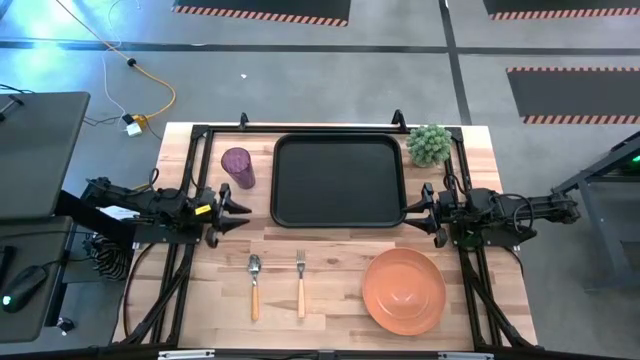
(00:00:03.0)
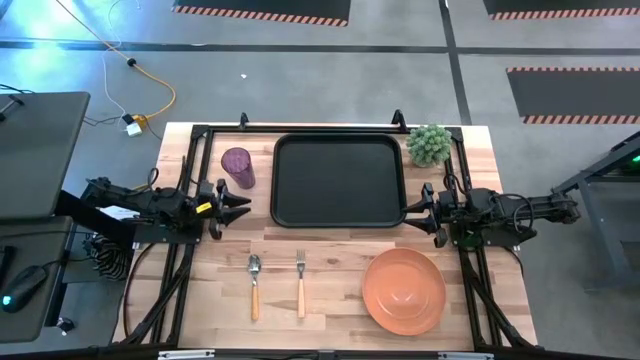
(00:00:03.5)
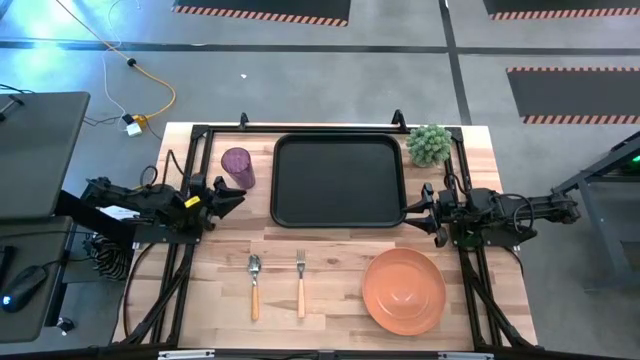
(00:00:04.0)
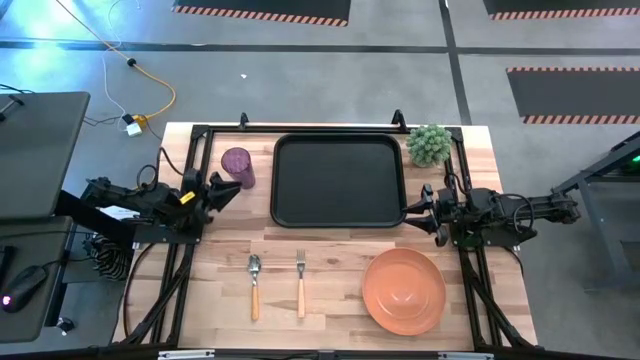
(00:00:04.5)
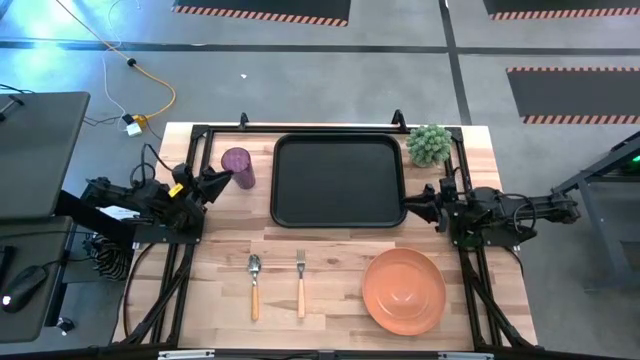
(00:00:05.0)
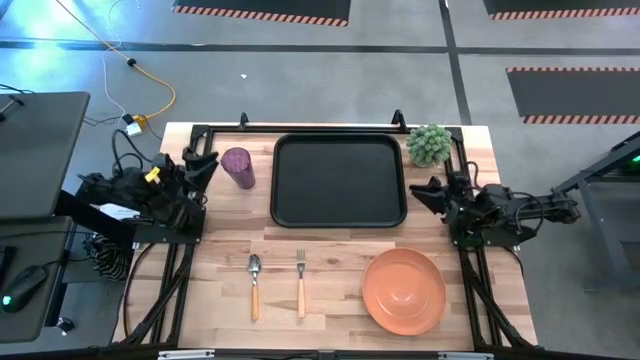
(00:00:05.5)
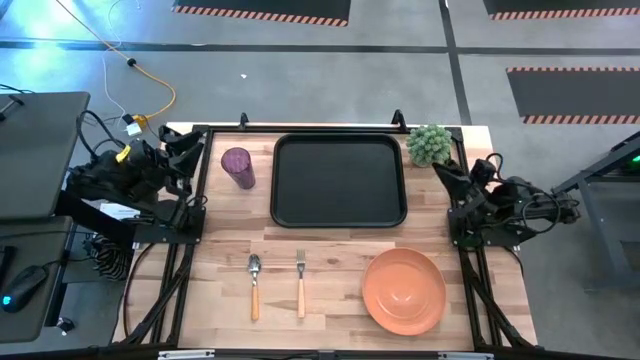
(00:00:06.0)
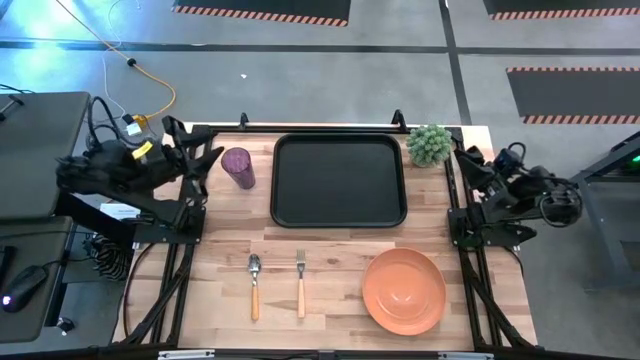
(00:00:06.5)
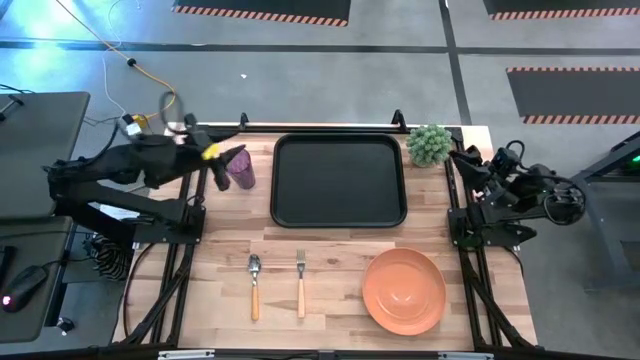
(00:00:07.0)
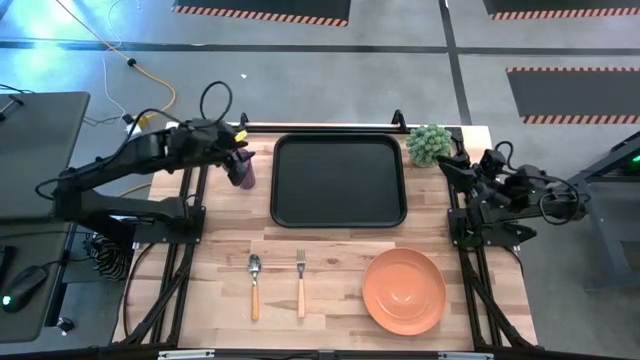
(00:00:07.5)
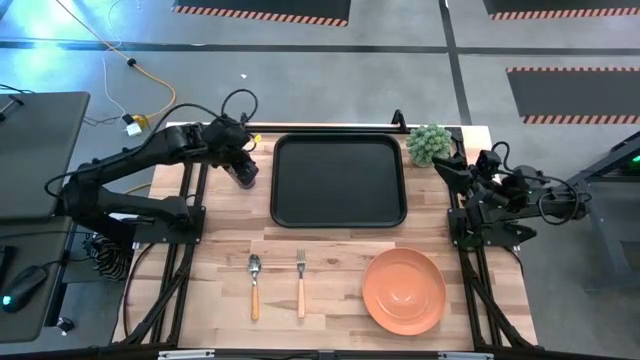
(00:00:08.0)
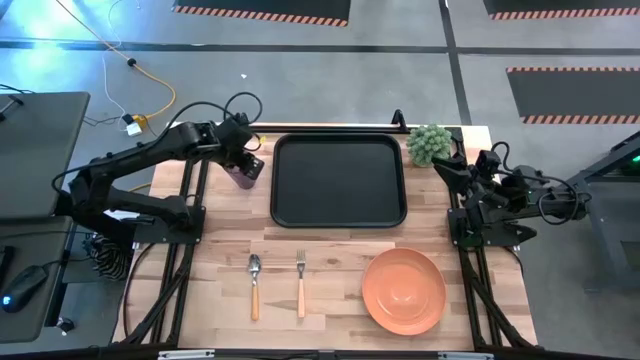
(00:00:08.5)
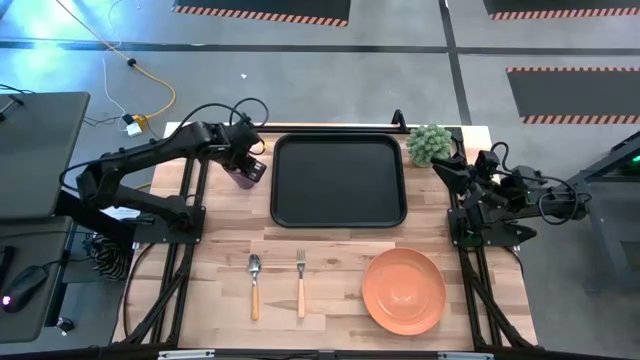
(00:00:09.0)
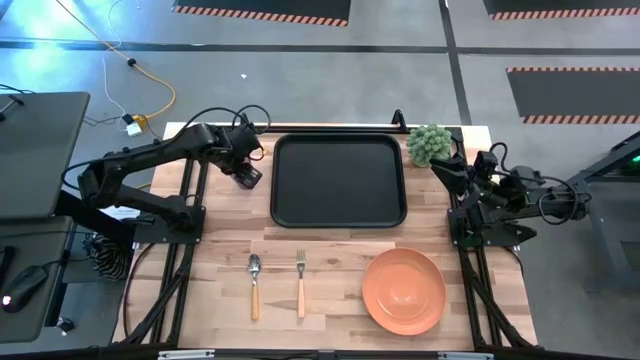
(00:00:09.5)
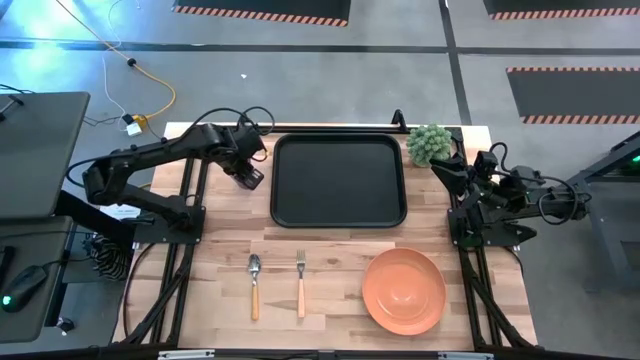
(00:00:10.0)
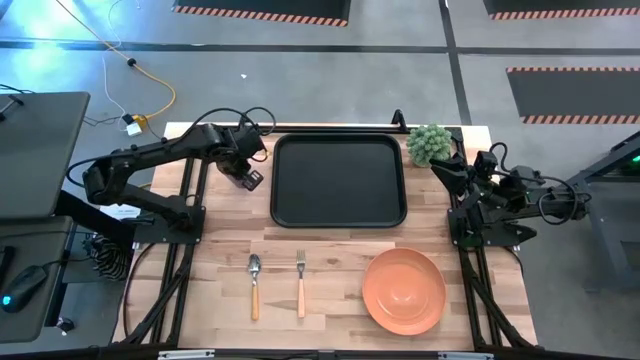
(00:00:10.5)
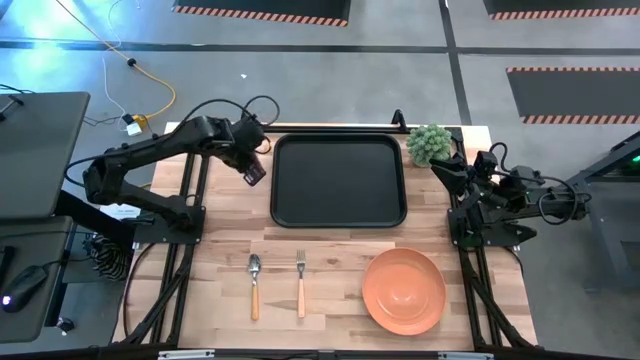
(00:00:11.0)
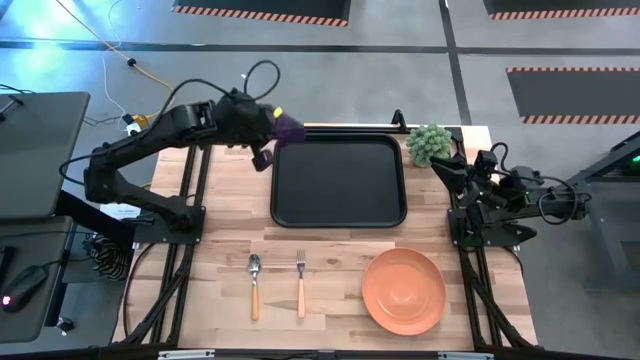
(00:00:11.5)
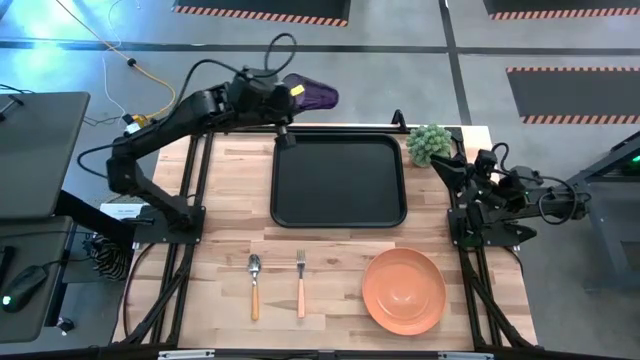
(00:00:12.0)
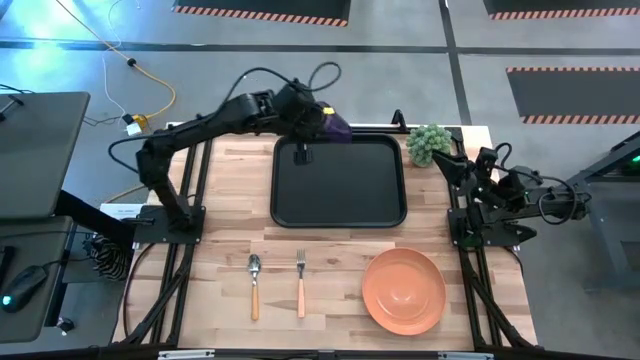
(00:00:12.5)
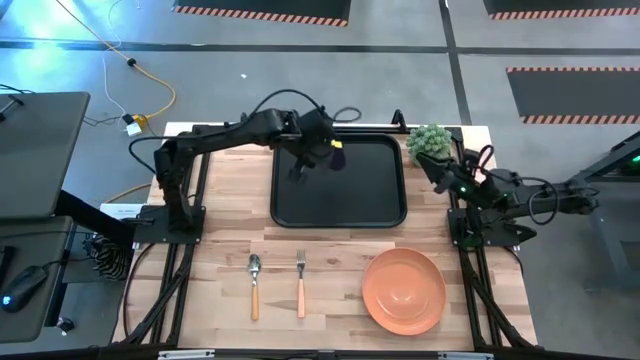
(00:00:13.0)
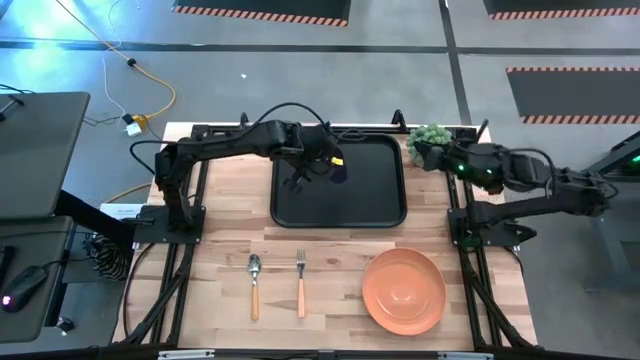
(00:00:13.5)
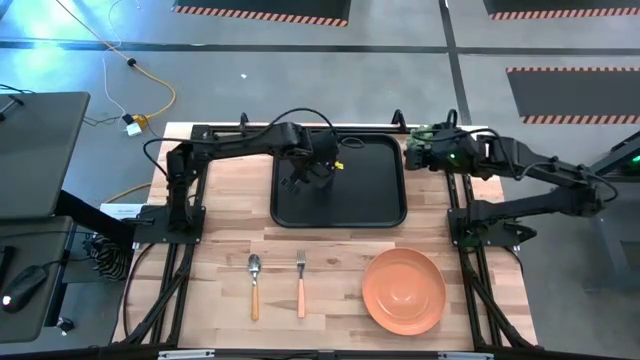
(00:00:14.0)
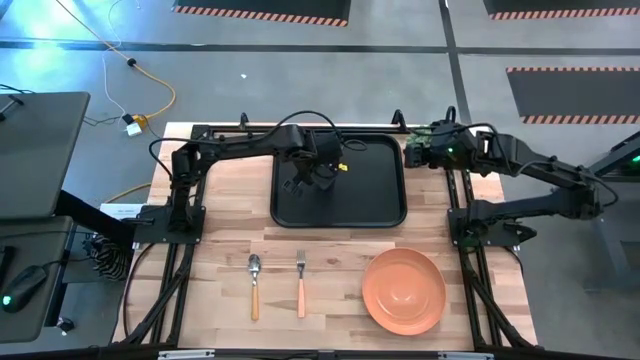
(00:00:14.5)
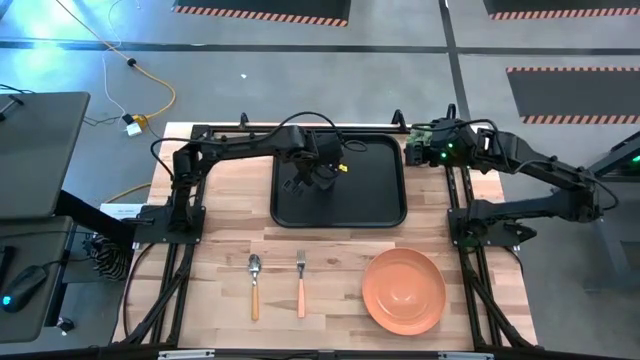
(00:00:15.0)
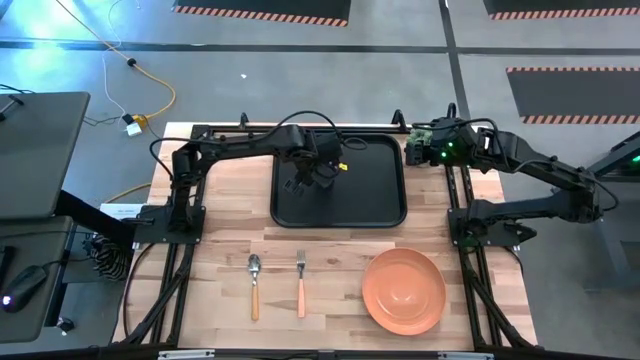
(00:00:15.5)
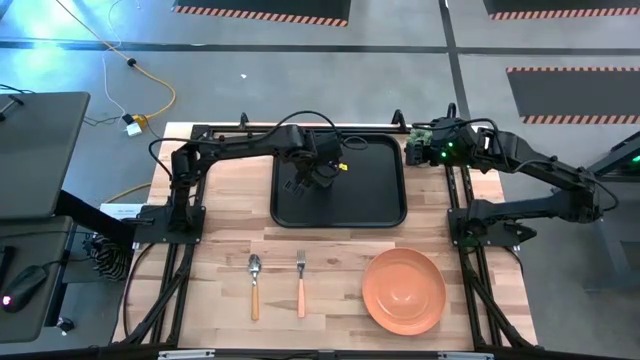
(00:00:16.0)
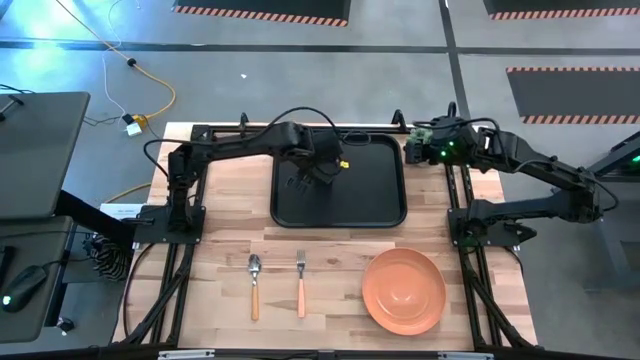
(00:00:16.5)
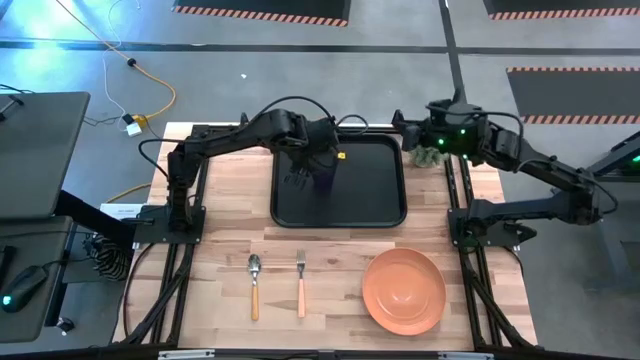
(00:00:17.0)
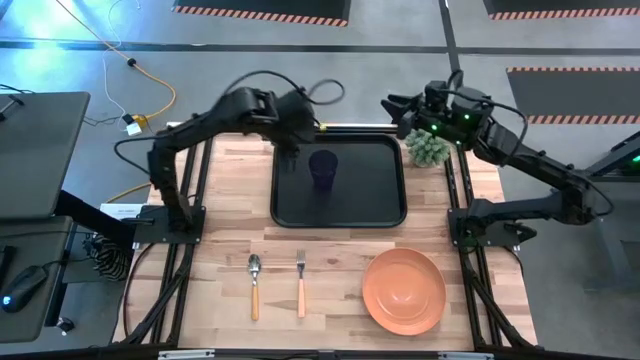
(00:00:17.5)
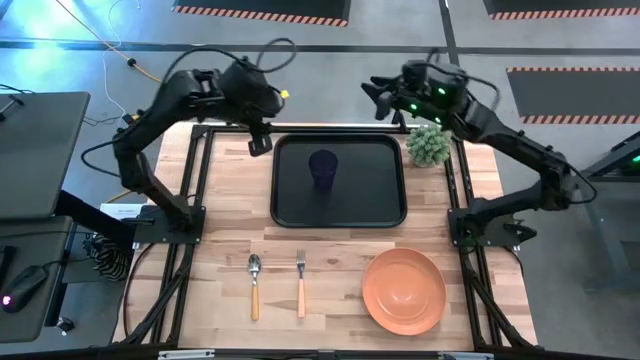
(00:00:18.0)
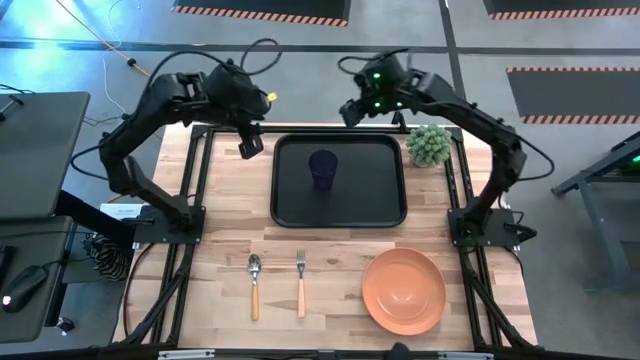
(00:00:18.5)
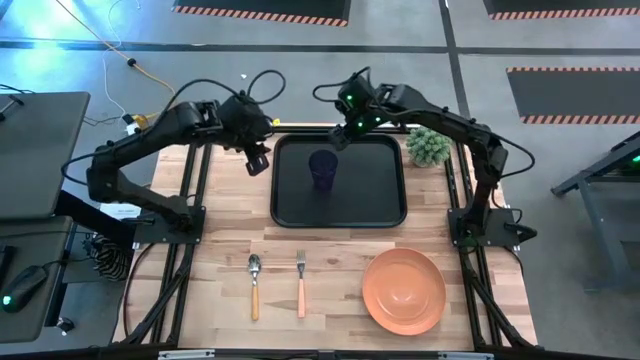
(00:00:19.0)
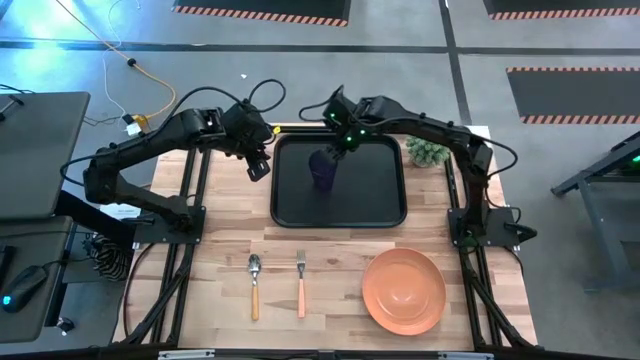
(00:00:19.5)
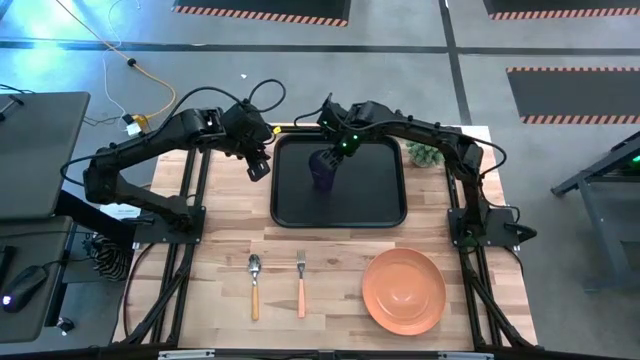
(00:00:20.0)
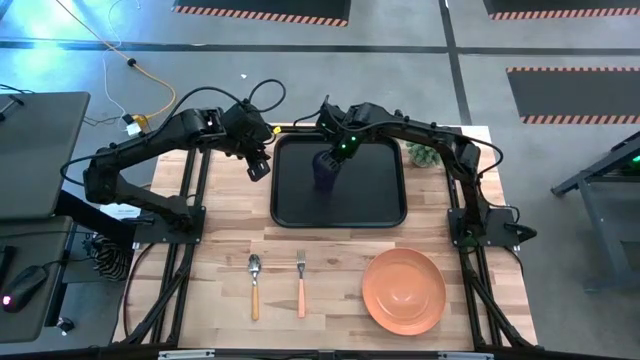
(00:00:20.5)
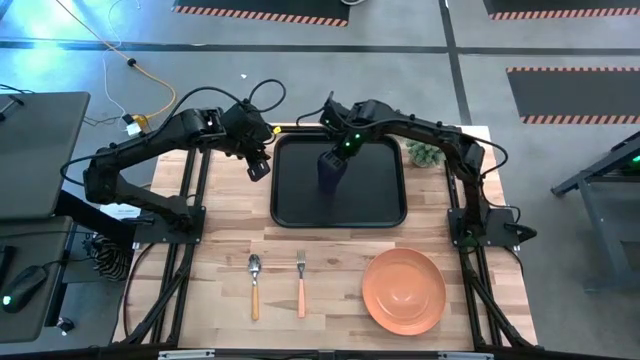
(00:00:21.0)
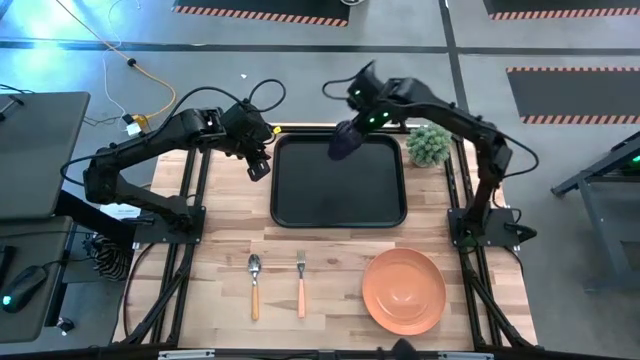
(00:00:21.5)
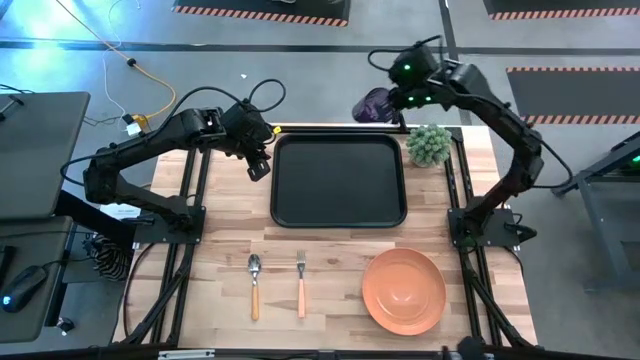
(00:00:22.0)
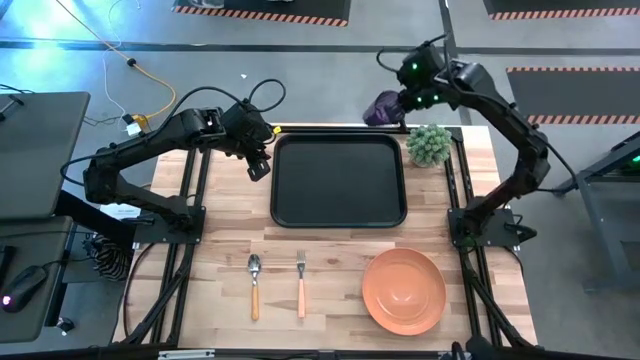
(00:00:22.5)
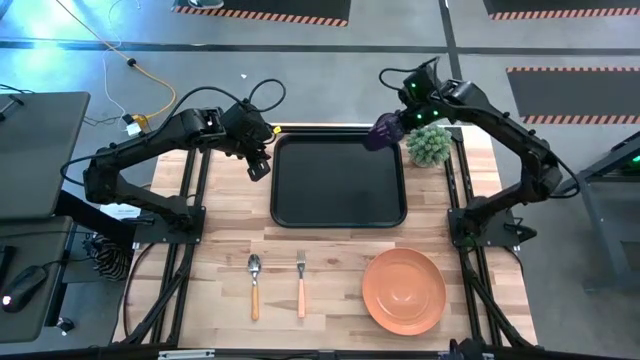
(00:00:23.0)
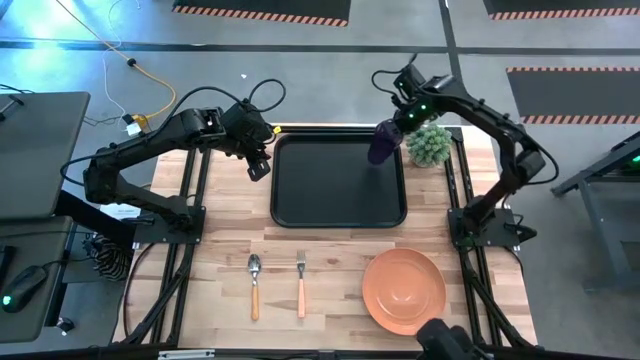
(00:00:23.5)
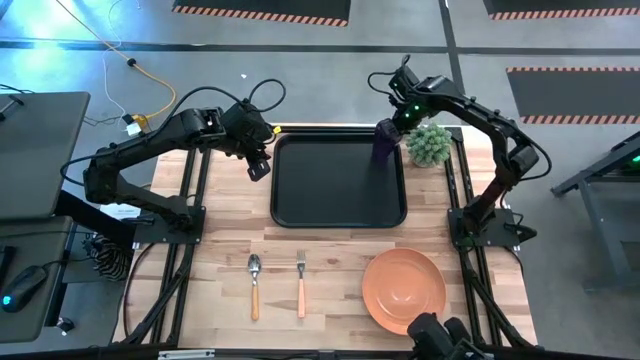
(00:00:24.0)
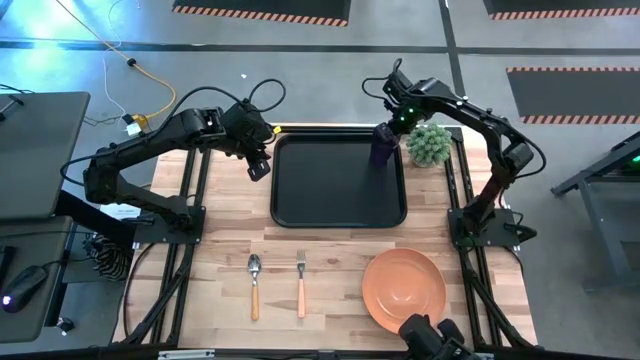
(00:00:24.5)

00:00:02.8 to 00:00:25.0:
Task: Pick and place plate/cup/fork/spoon on tray
Put the purple glass on the top left of the black serving tray
